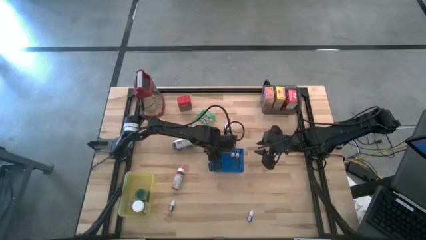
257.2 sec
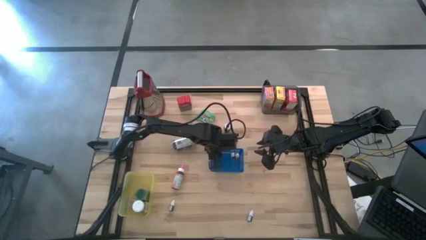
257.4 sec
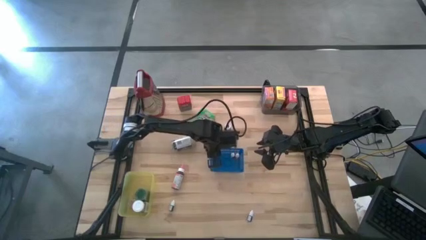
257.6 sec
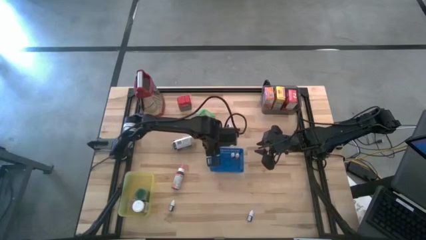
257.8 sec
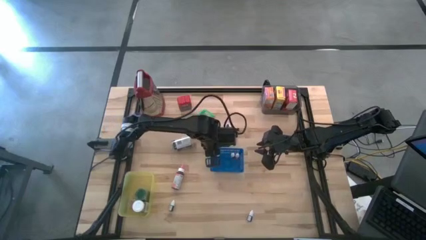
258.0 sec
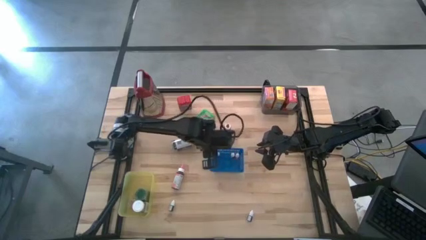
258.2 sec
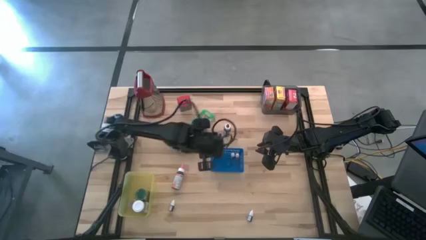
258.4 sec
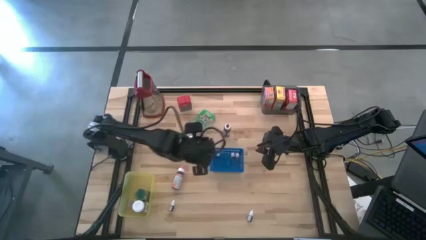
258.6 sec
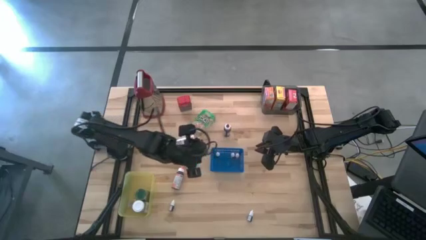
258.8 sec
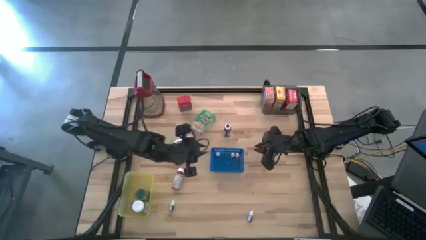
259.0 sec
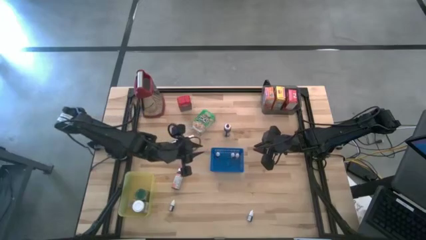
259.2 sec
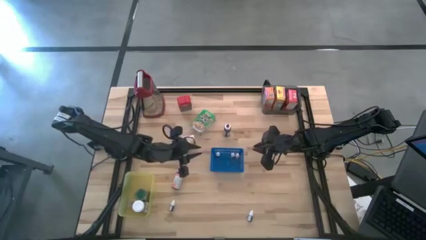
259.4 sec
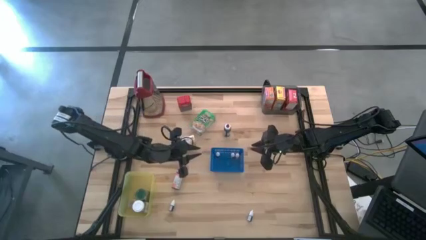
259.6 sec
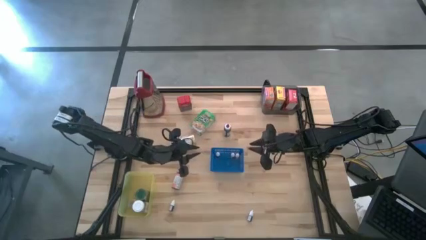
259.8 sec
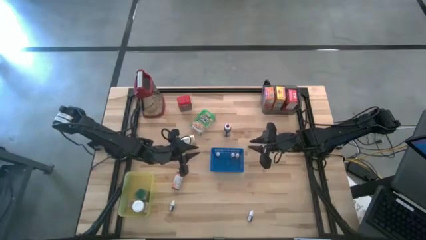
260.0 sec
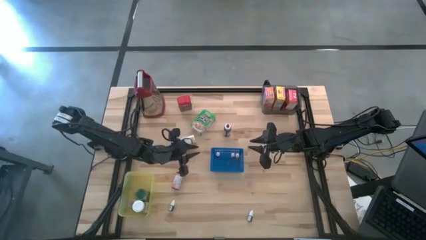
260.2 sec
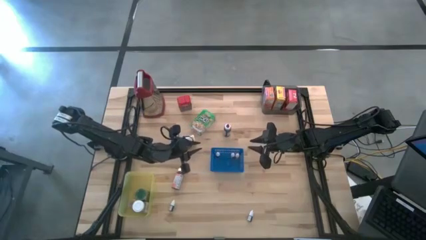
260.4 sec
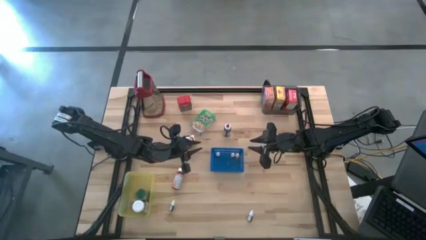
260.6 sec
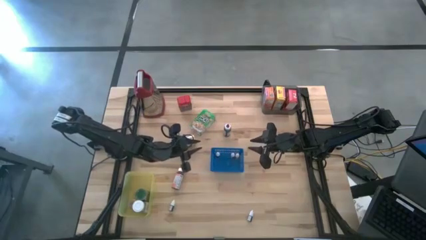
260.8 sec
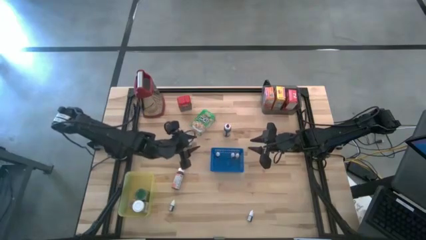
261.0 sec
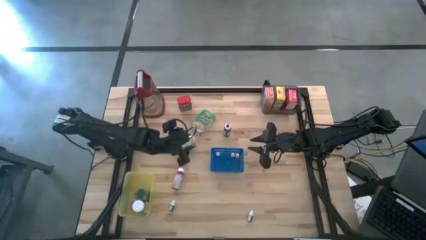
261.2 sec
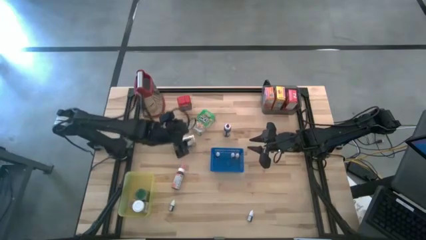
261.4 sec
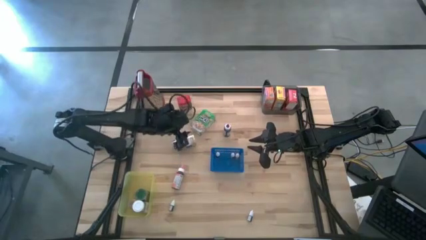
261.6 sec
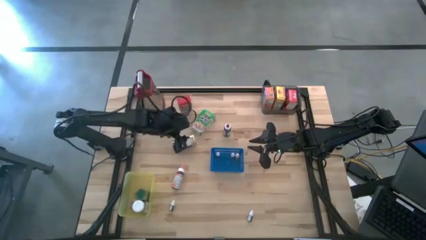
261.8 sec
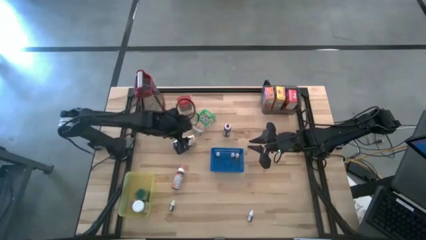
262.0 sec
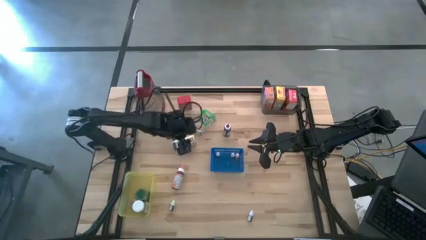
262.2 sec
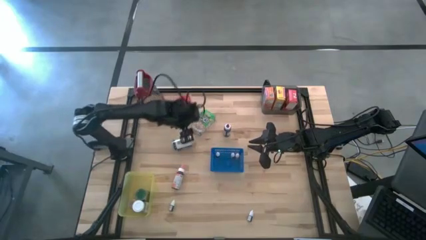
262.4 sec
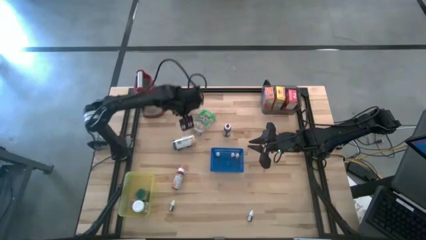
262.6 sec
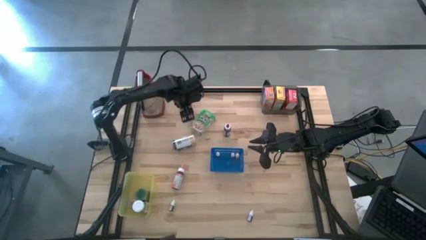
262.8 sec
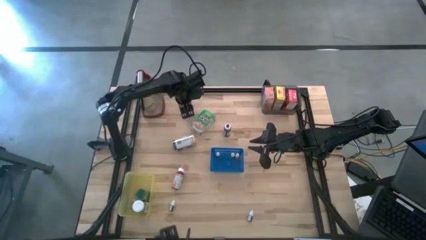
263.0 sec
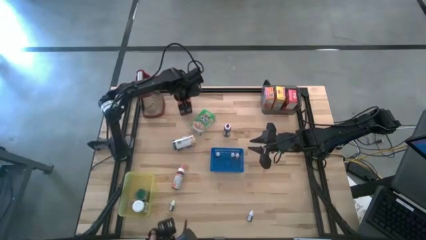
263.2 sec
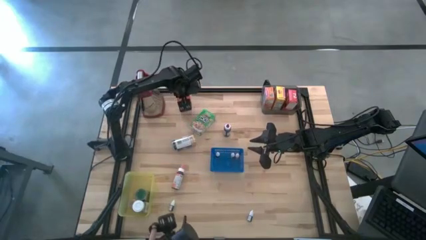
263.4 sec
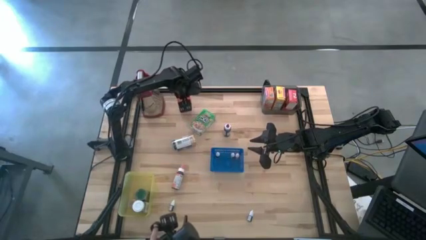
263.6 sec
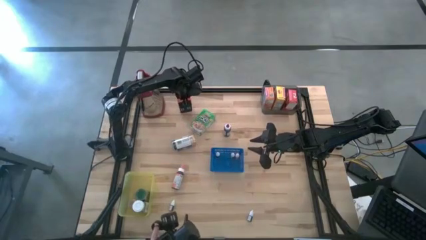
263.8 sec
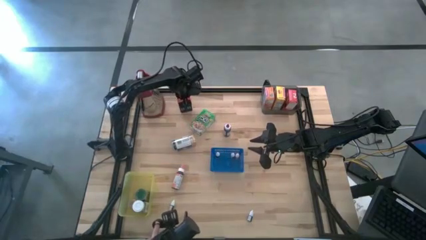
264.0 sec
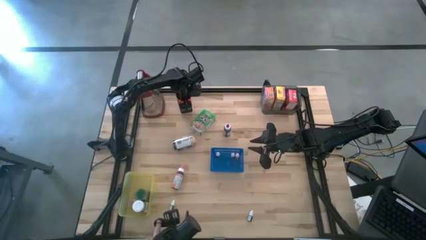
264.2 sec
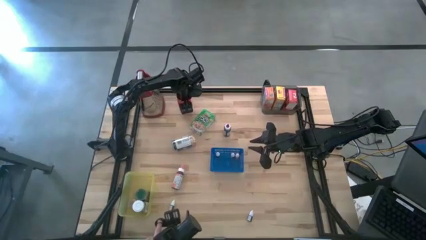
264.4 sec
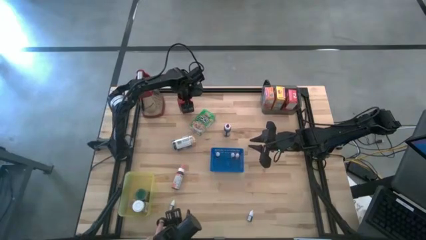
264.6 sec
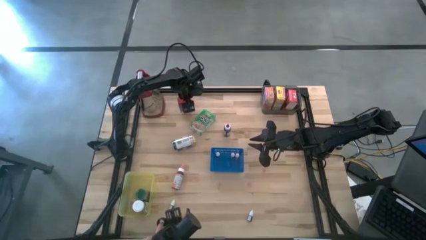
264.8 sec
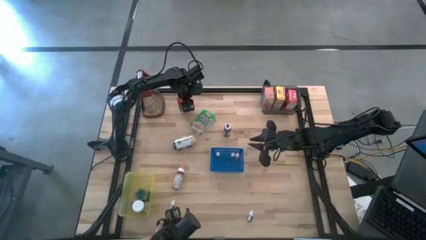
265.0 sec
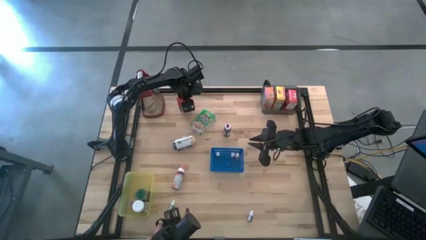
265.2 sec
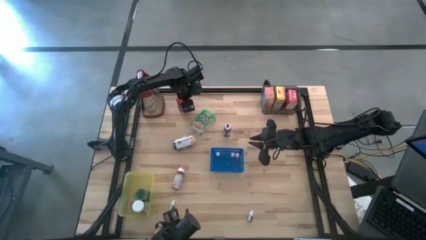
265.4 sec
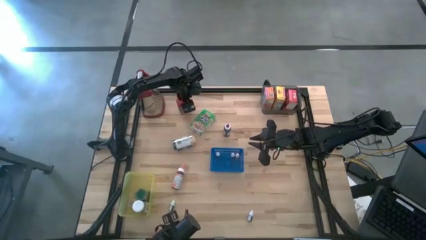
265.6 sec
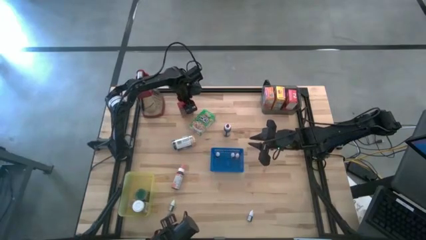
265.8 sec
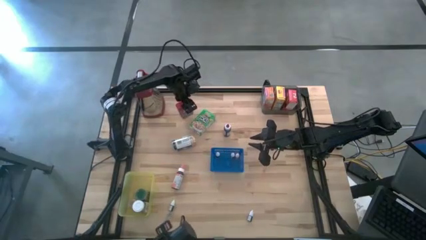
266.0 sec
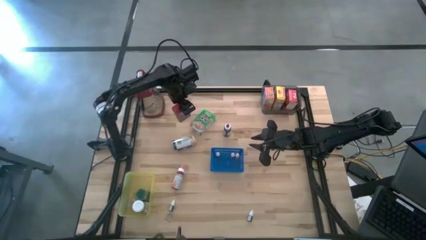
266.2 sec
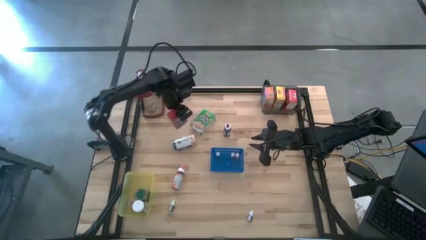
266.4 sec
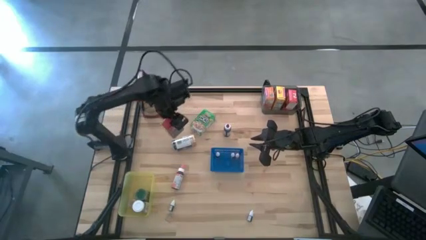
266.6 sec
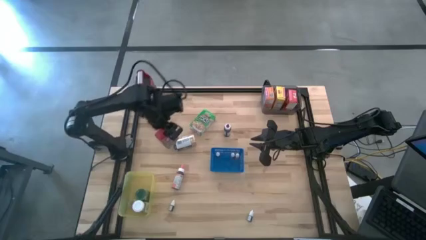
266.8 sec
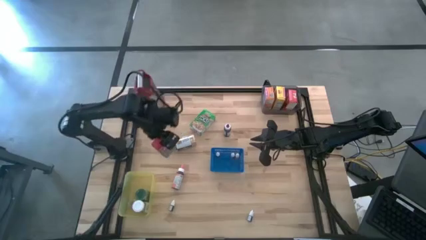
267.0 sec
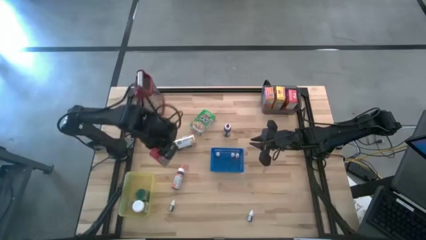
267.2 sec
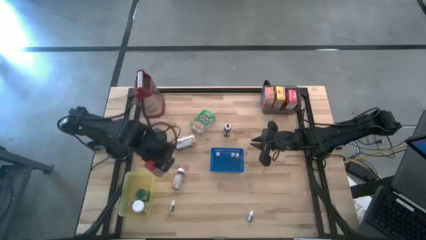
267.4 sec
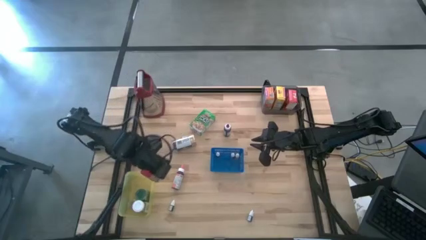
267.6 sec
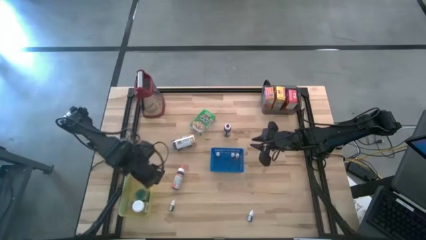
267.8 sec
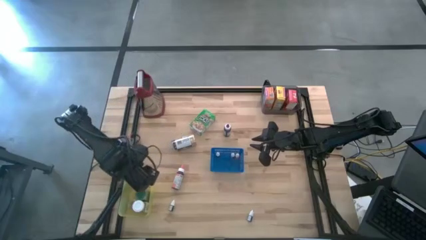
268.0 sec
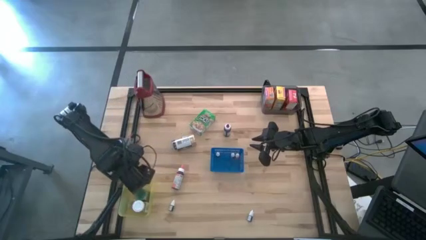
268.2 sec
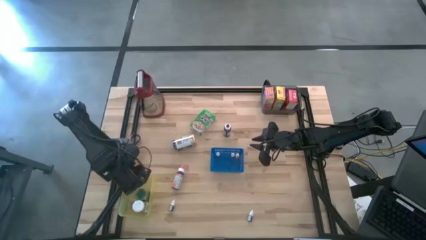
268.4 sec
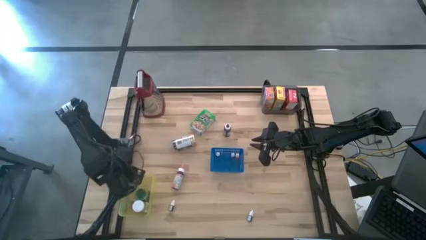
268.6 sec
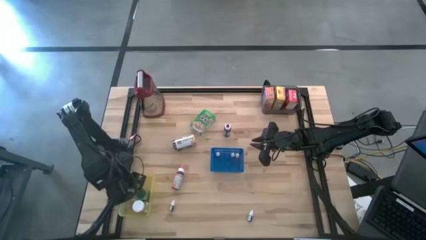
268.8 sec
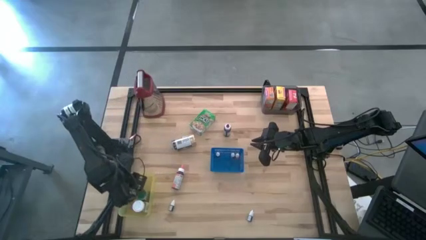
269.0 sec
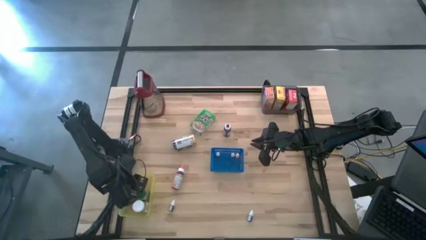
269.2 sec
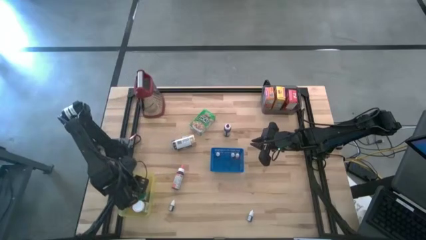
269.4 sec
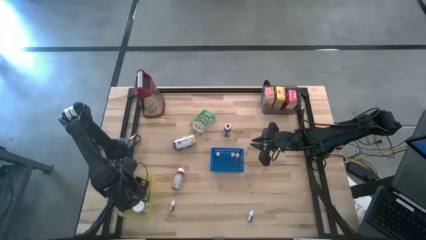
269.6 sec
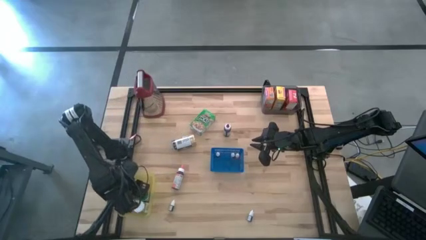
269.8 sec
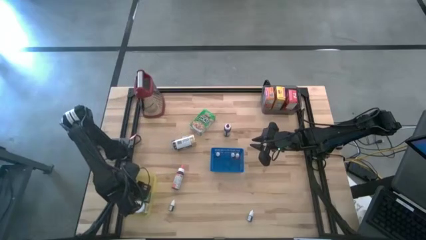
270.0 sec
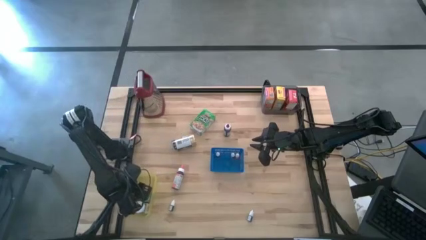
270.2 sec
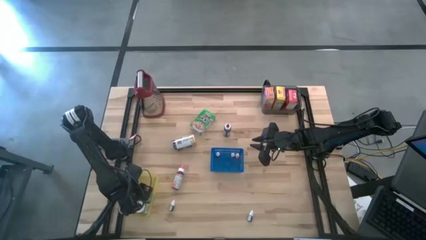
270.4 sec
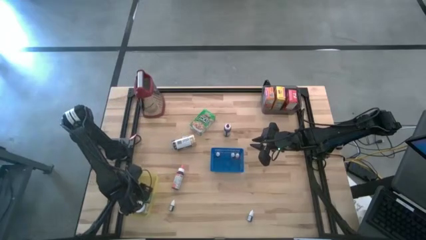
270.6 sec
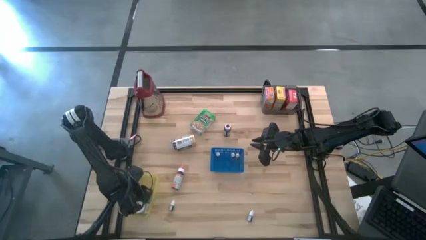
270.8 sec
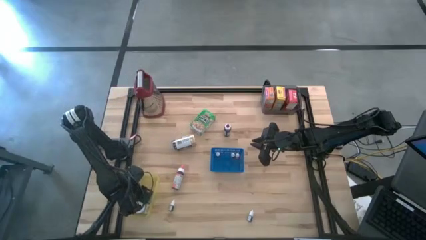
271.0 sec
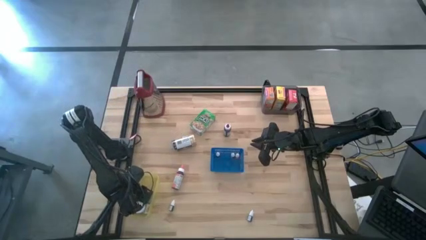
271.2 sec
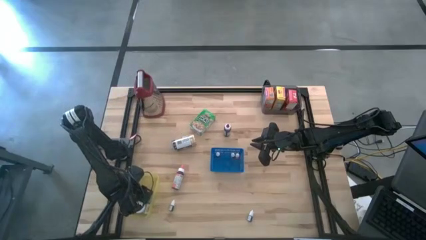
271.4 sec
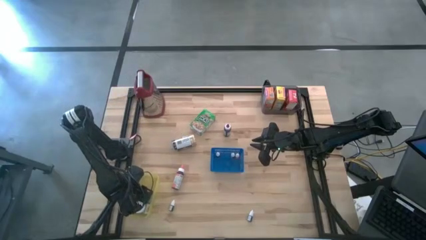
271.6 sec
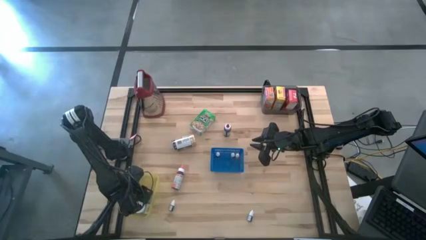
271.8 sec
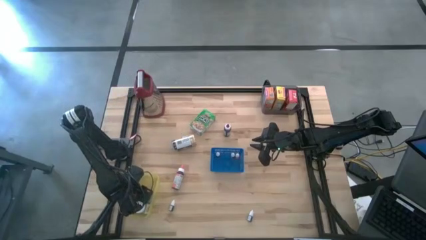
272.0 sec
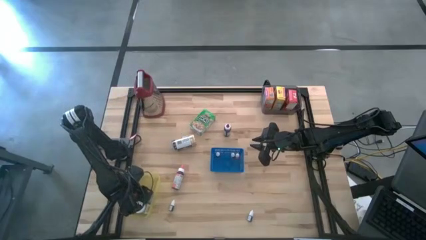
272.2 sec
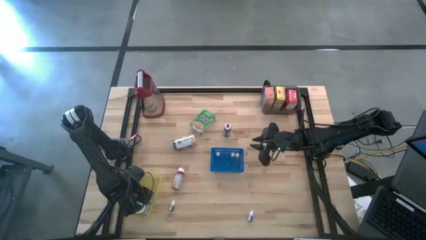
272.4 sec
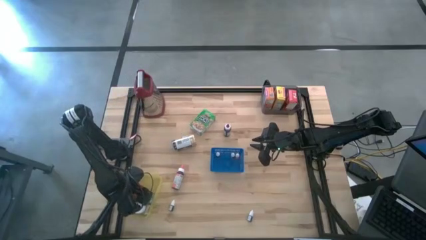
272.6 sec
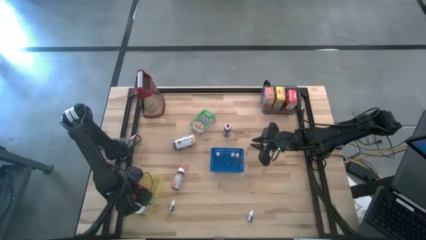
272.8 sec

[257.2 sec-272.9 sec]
Task: Pick & Place Kitchen Items
Put the red seasoning can into the yellow bin

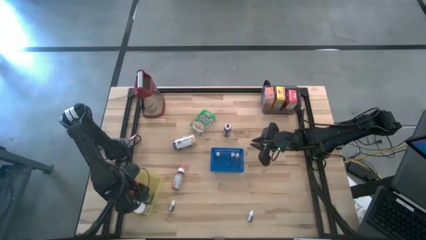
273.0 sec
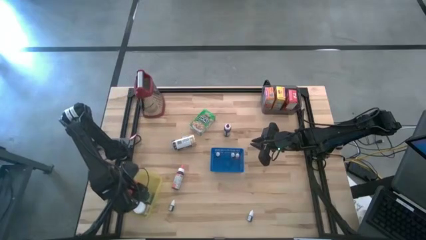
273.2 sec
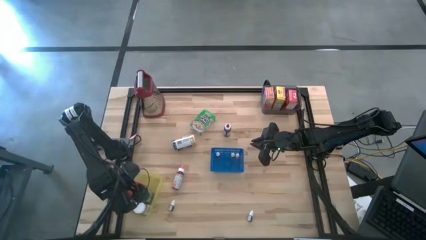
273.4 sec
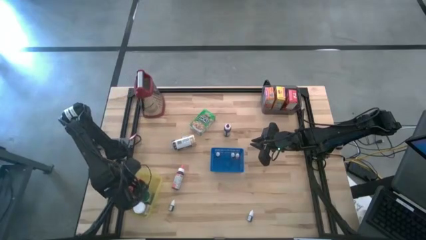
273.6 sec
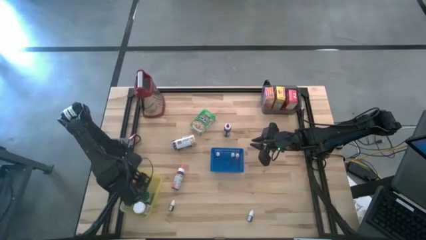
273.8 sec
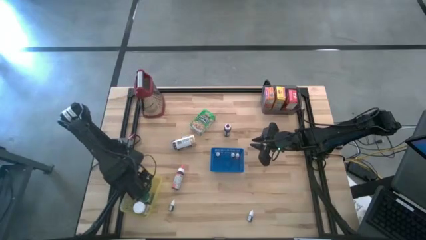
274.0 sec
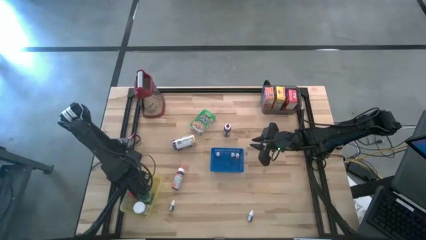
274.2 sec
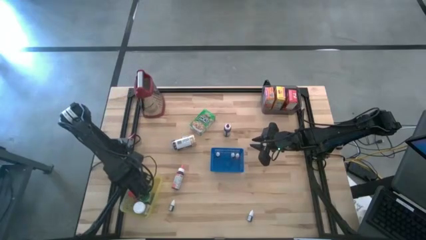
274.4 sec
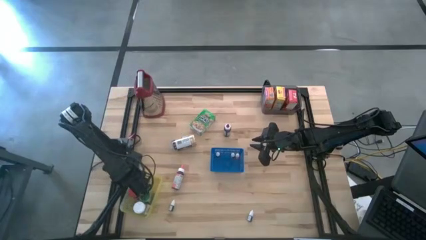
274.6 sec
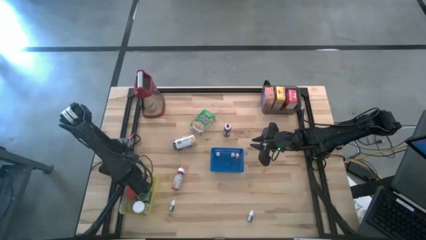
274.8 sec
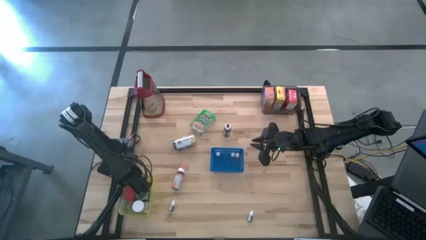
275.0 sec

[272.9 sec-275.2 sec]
Adjust the yellow bin on the table
